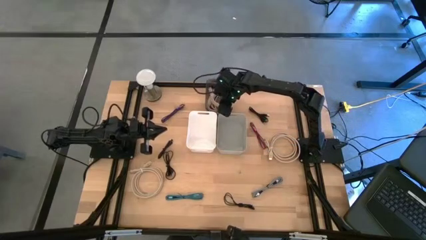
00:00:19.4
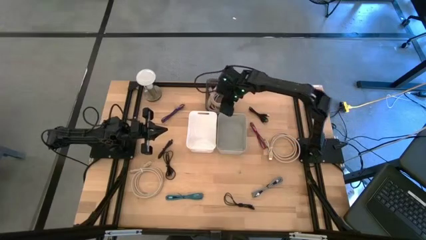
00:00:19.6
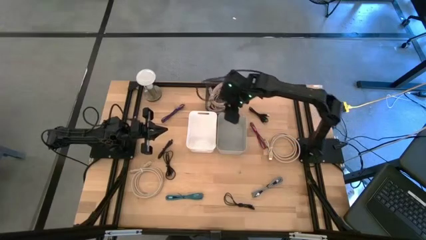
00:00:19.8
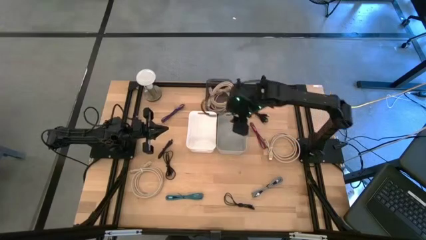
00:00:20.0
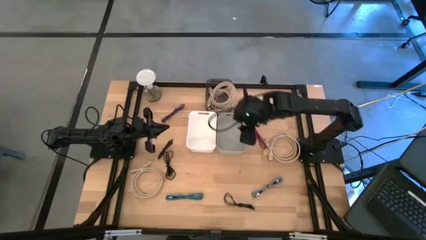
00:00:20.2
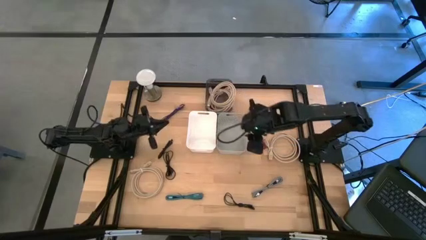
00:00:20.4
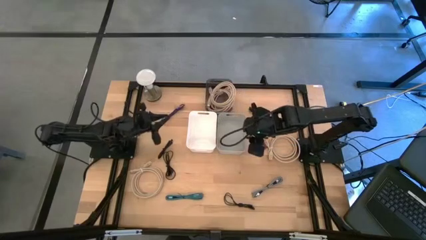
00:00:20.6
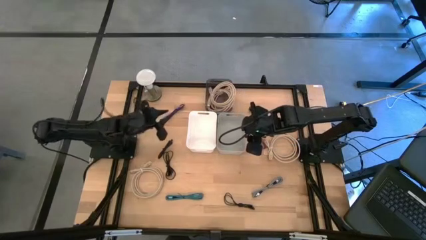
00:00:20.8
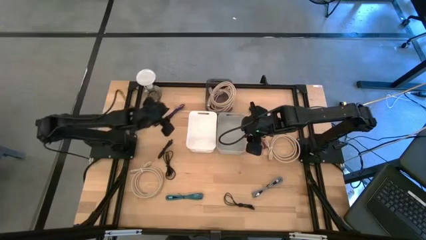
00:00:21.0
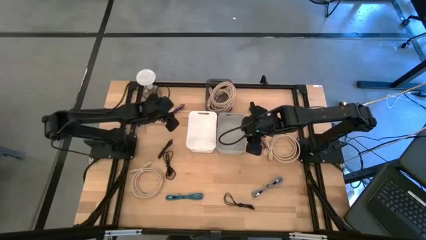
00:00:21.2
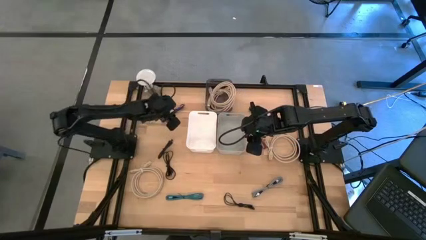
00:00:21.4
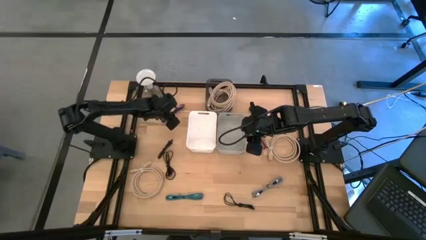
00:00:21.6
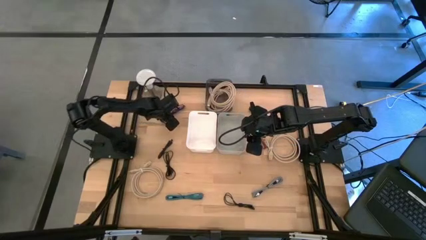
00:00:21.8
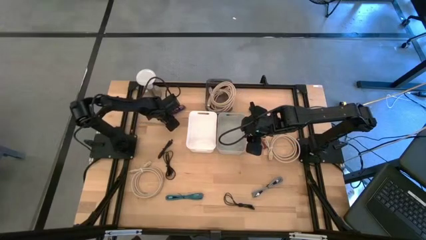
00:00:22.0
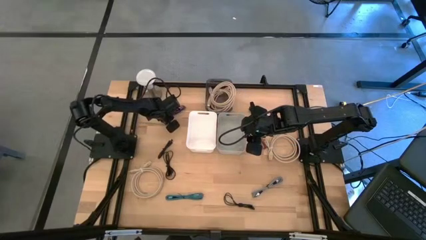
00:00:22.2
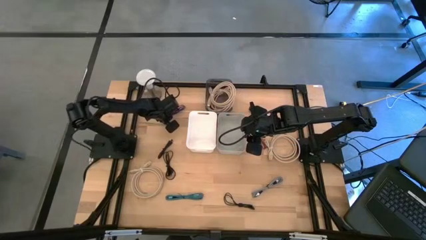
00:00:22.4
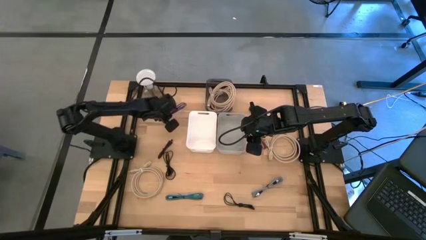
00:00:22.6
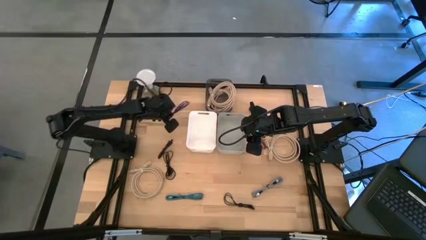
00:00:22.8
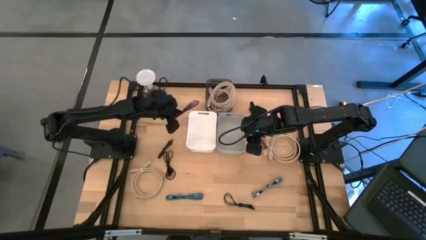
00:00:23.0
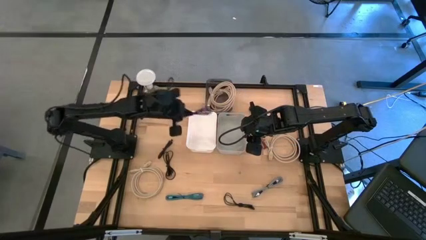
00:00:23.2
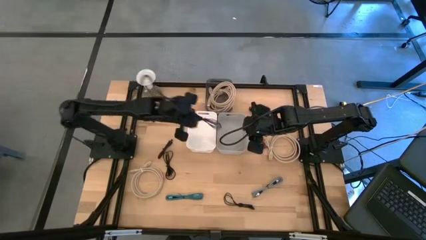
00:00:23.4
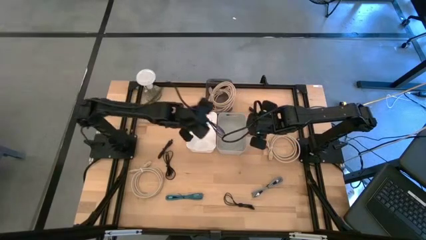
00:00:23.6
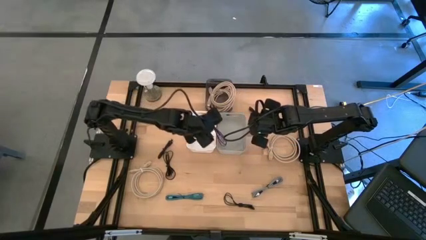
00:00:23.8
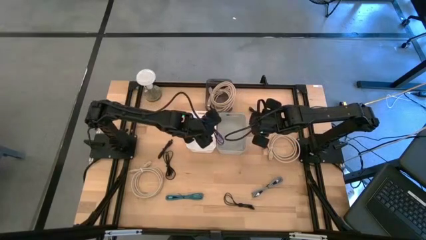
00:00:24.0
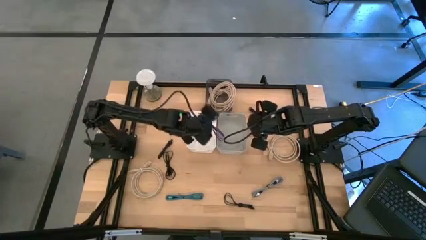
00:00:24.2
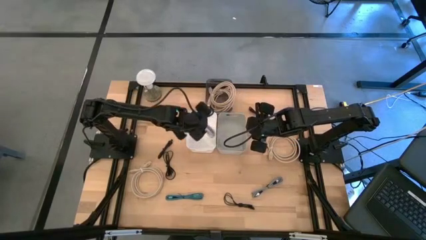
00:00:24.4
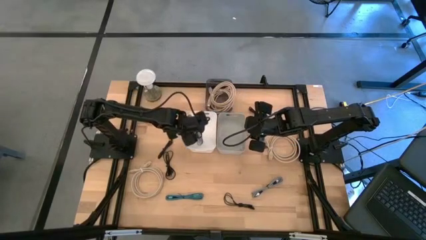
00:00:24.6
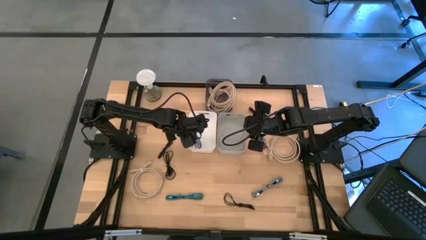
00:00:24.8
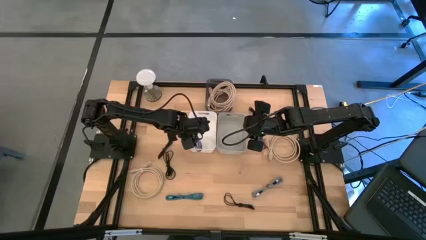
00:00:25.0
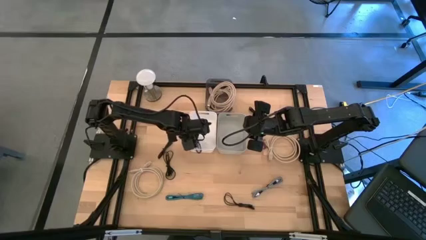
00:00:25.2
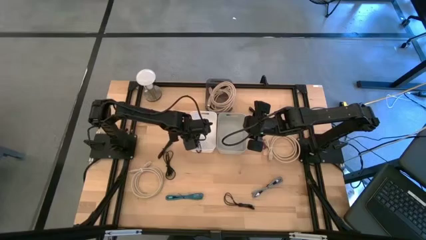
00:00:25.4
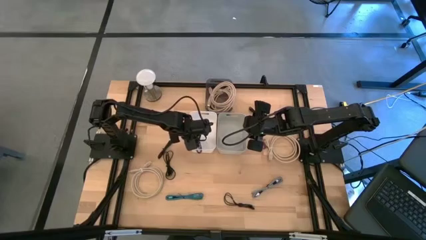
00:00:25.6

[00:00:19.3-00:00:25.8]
Task: Pick & Place USB Port
Put the purple patterned charger cable into the white bin

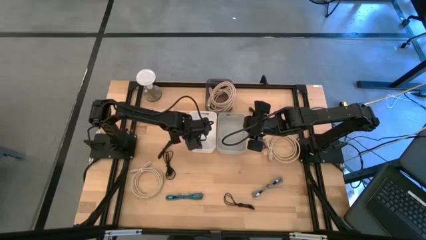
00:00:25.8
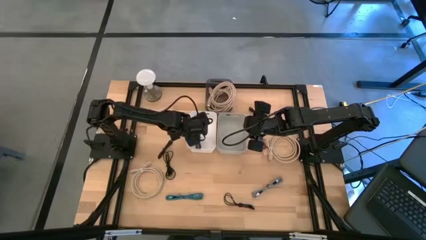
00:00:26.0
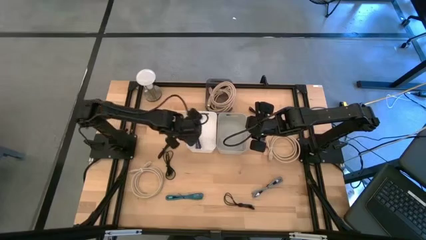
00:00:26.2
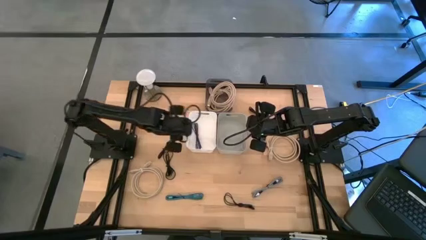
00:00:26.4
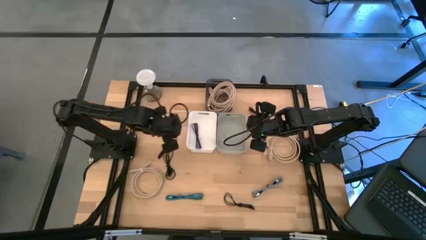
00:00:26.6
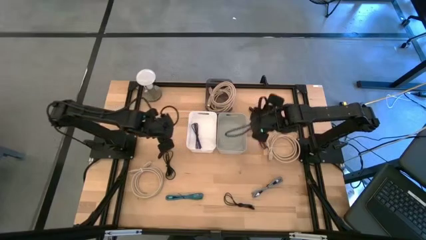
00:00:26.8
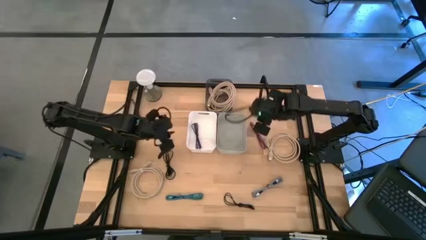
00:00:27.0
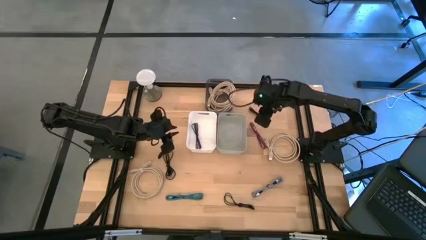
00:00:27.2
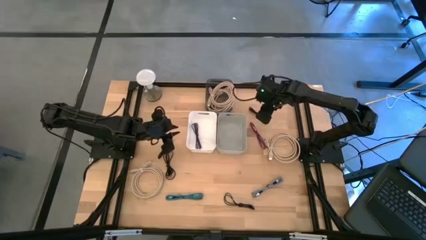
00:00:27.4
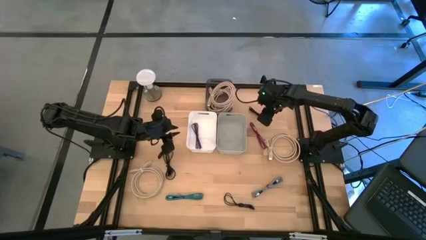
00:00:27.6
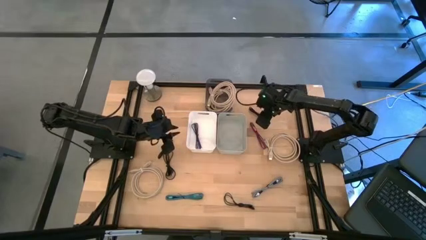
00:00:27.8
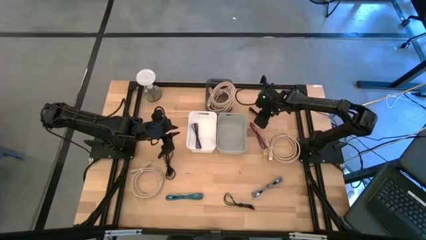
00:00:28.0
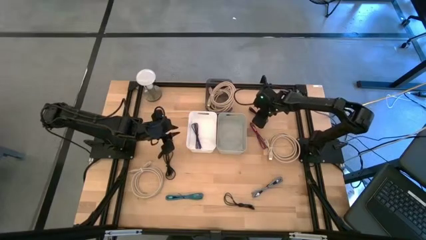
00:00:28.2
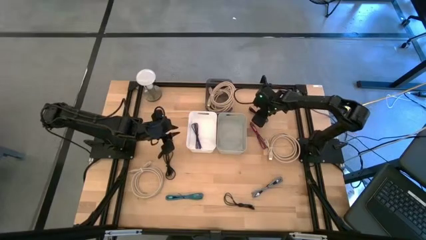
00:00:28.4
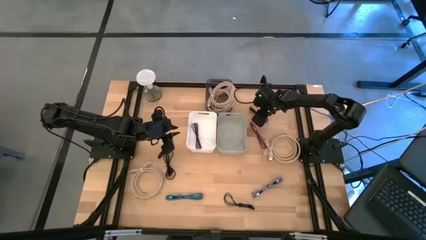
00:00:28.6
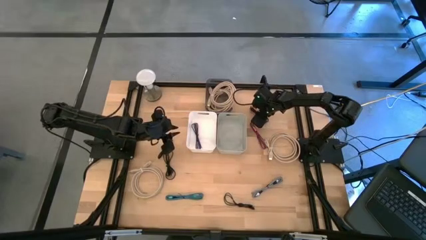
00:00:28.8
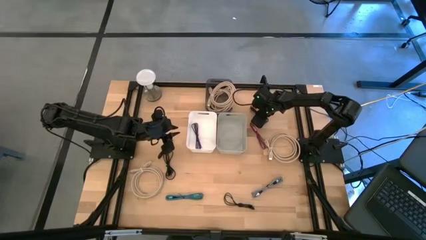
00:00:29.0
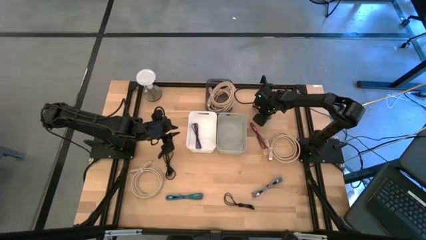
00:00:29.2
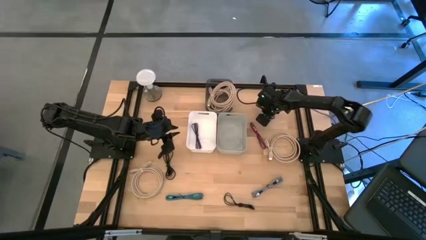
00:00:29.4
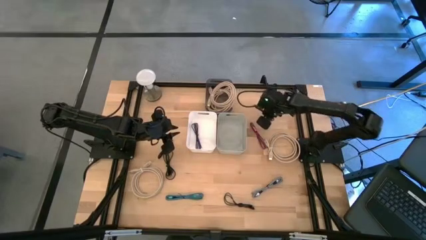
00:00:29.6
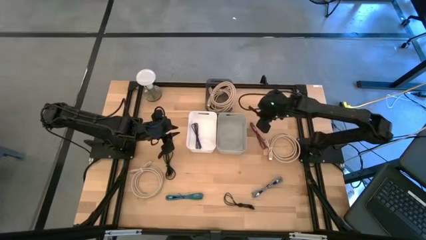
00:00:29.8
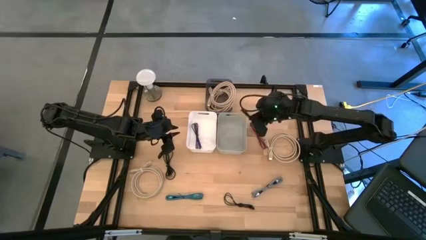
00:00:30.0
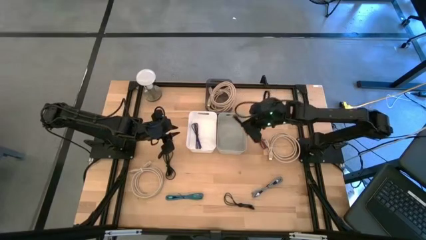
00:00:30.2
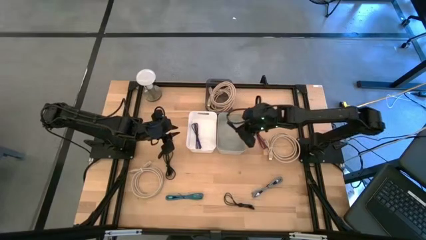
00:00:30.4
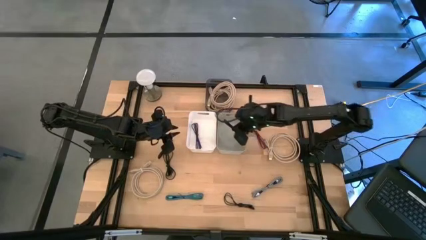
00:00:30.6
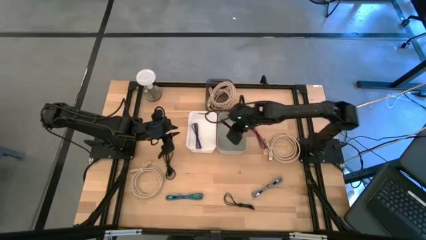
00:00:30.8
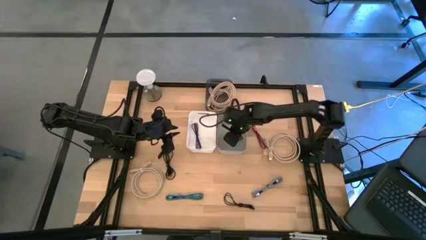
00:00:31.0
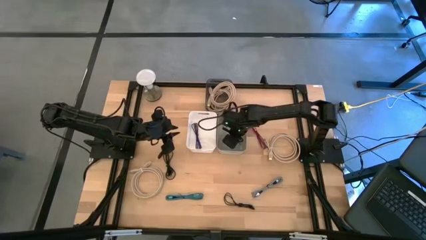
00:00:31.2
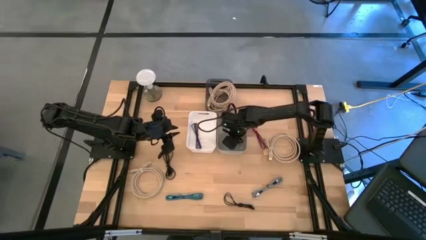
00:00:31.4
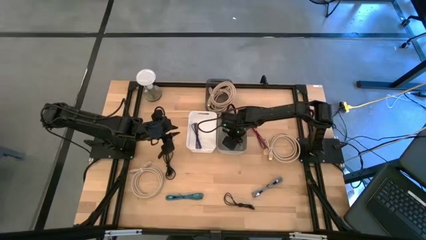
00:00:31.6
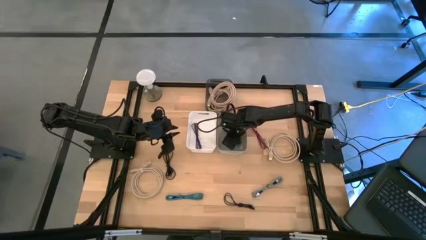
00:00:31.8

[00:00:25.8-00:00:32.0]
Put the black charger cable into the gray bin

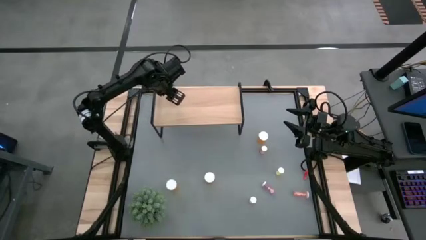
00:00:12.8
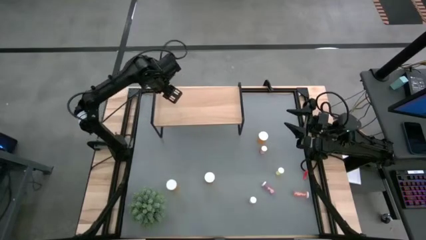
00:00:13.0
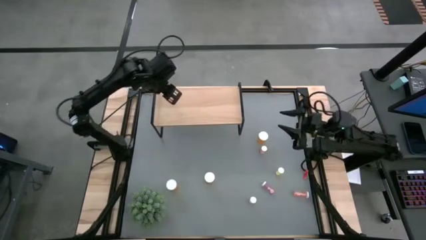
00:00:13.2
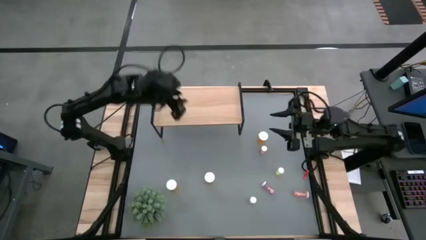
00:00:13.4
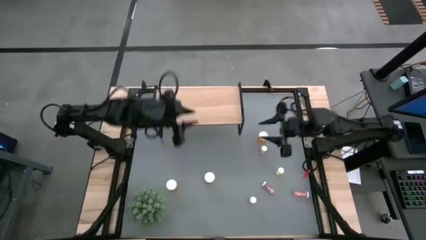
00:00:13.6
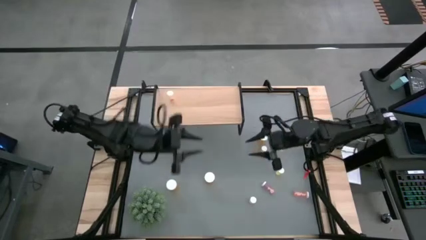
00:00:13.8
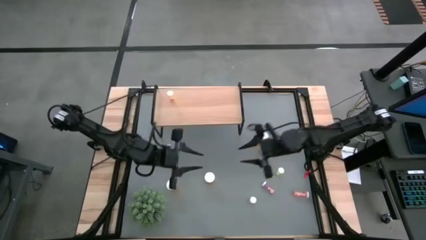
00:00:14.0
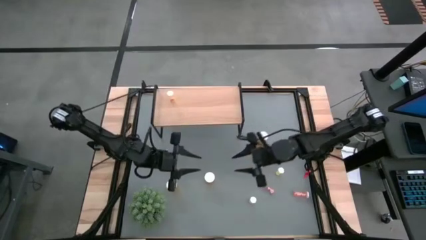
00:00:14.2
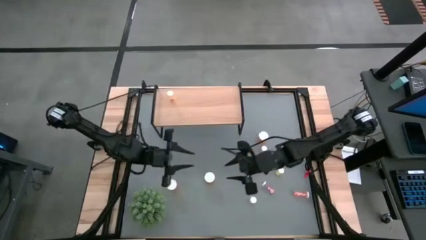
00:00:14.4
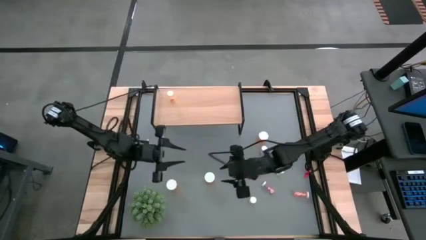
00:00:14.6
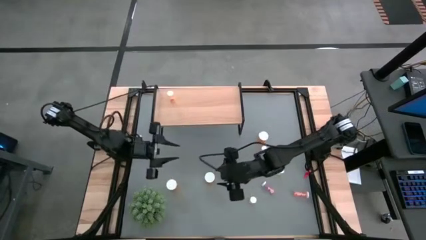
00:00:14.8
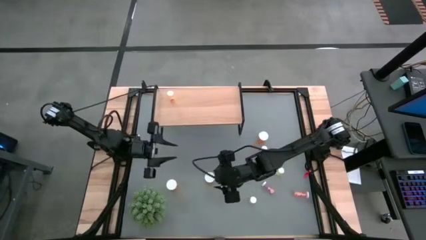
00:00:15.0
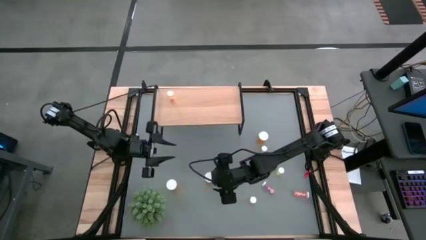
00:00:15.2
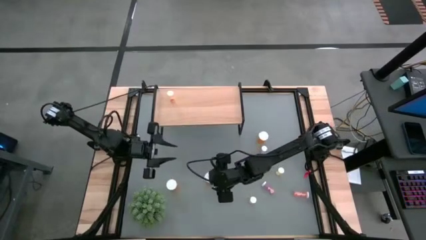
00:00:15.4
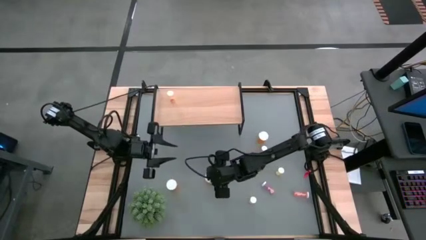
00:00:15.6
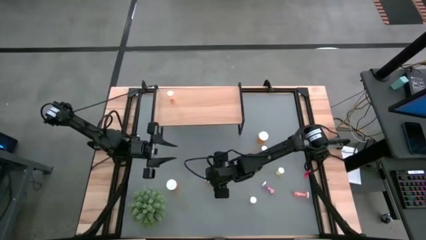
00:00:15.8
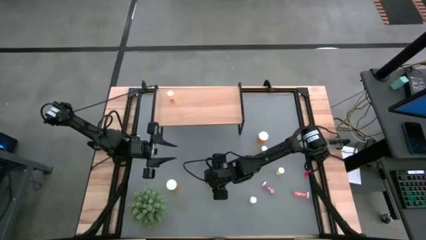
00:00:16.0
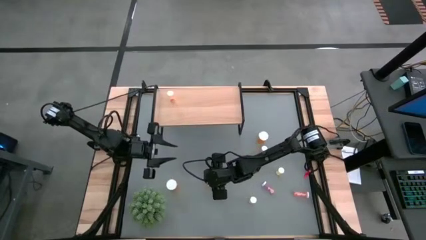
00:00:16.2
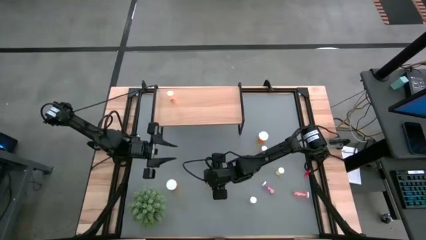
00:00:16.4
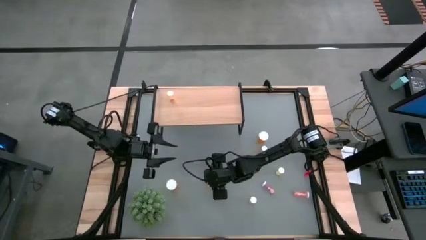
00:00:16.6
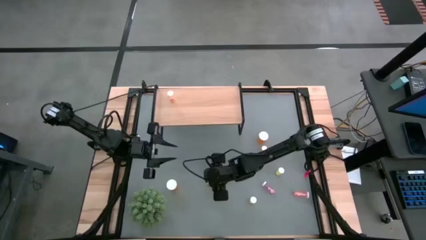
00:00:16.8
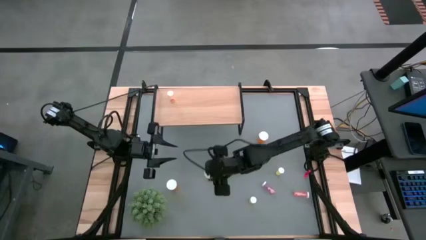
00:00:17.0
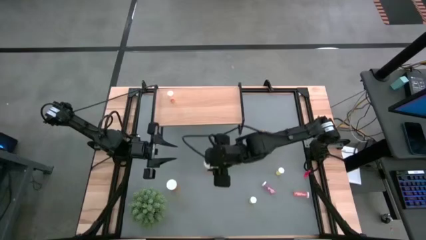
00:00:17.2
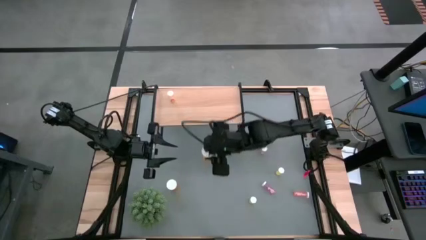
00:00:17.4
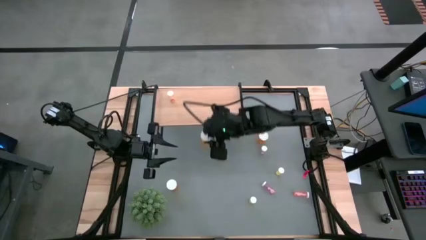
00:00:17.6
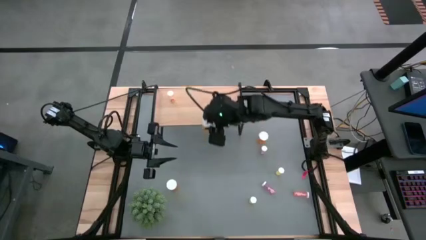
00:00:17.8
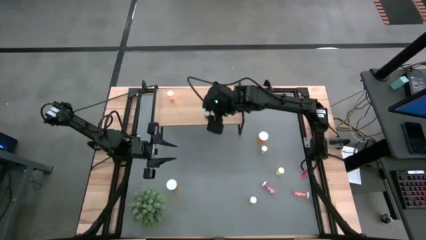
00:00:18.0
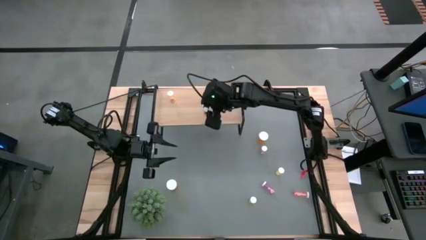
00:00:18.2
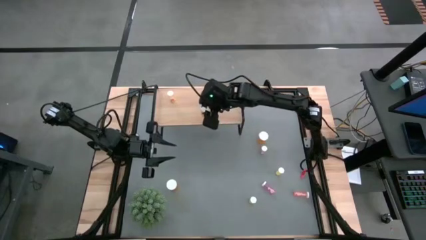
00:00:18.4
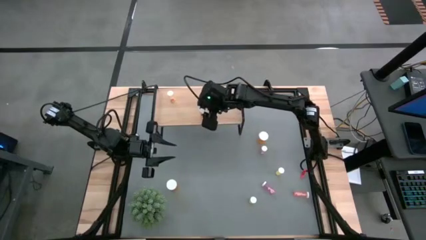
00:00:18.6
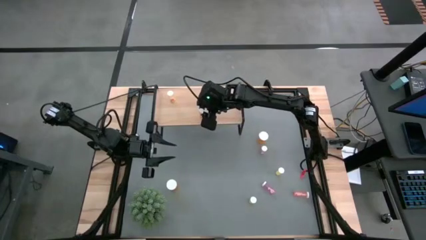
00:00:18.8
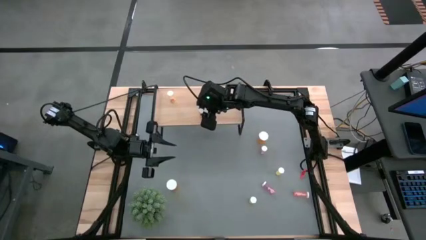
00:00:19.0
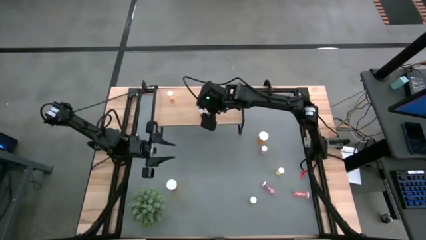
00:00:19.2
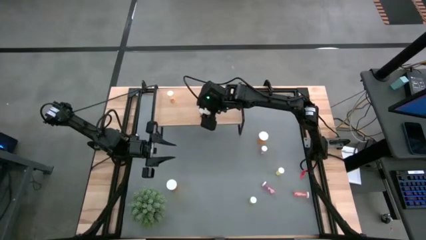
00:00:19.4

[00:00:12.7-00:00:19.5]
Task: Pick and place medicine bottles onto shelf by color
Put the bottom right orange pill bottle on the shelf
